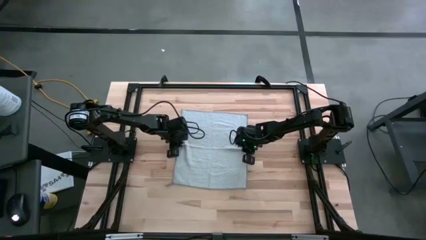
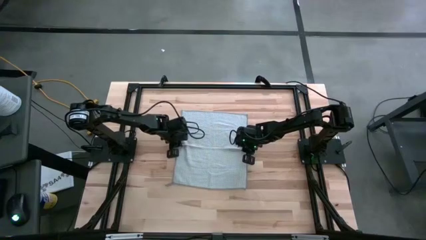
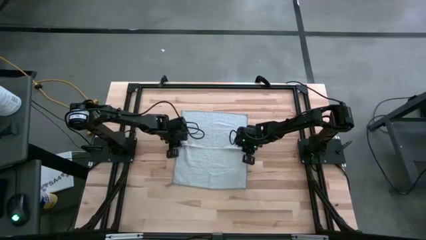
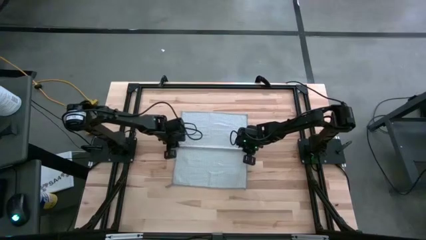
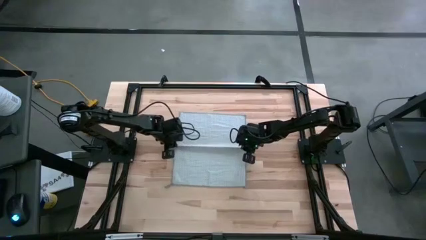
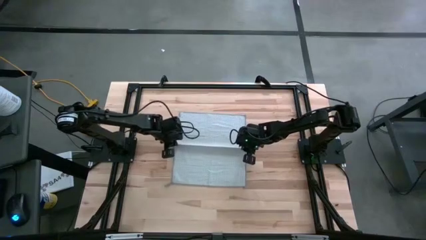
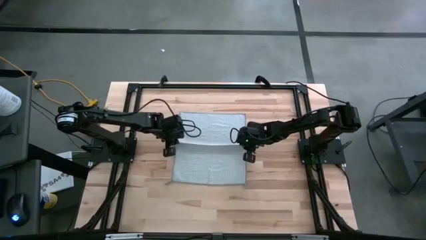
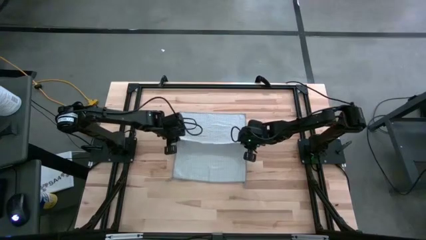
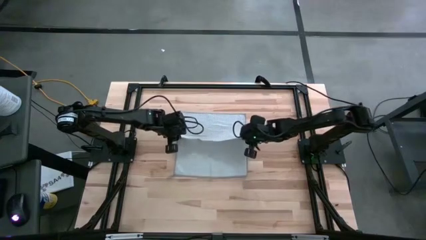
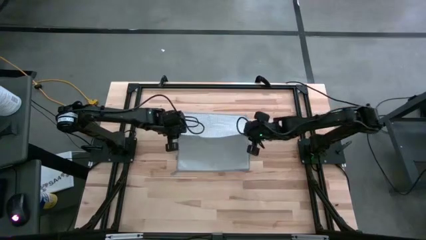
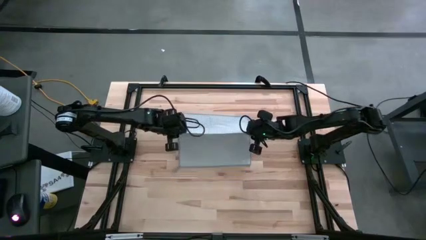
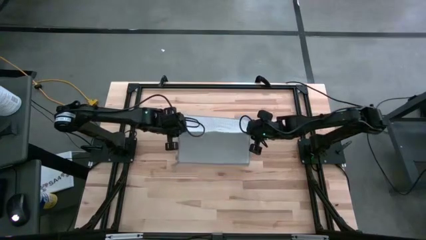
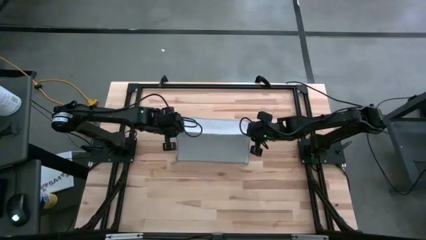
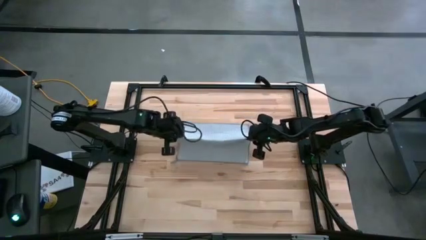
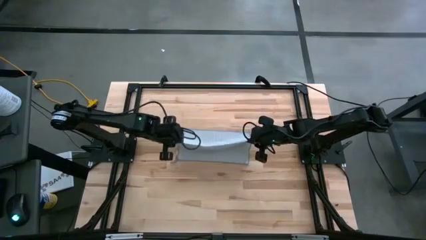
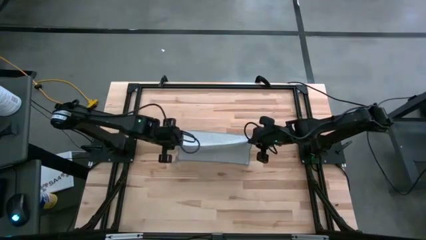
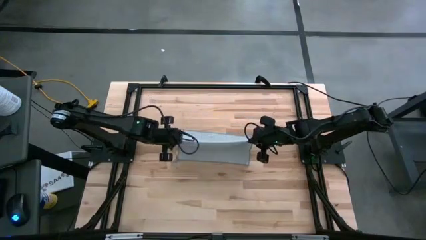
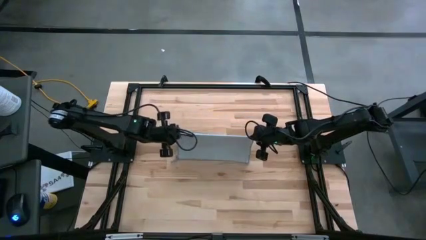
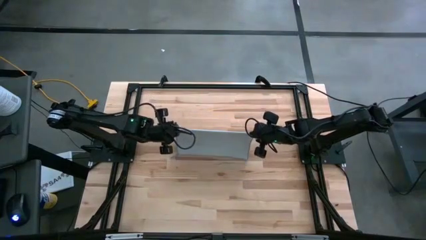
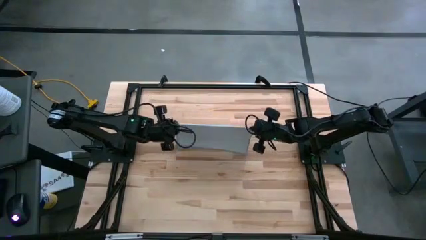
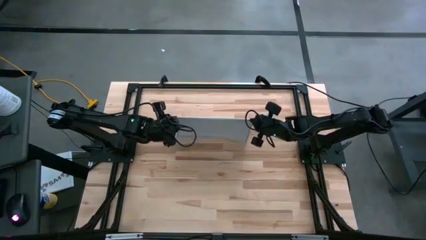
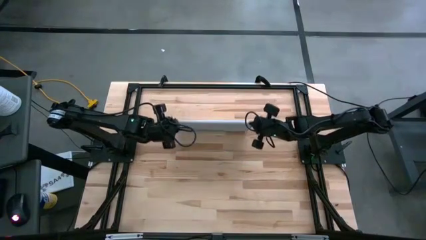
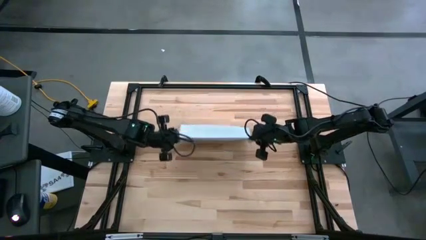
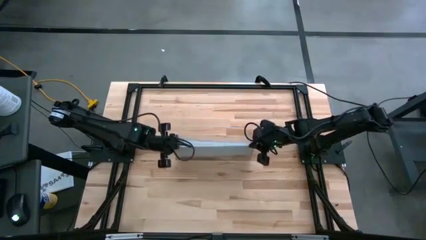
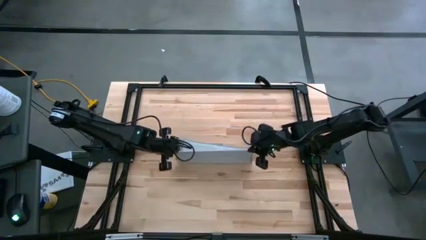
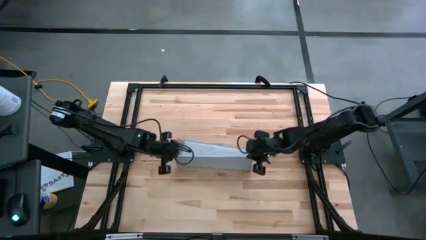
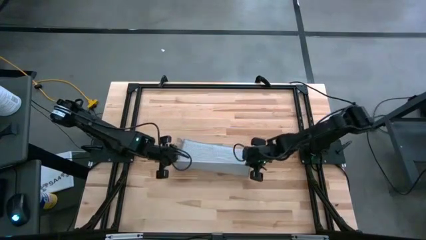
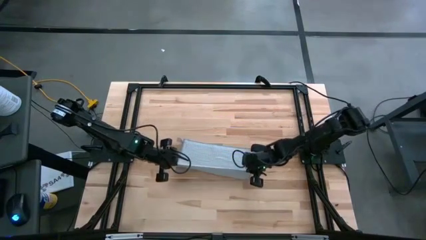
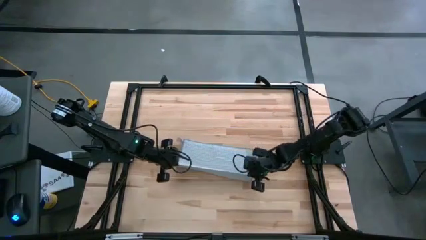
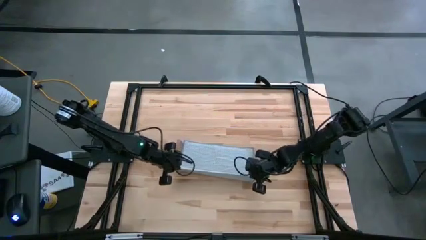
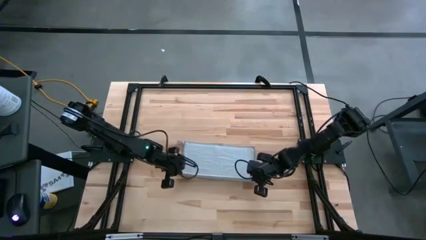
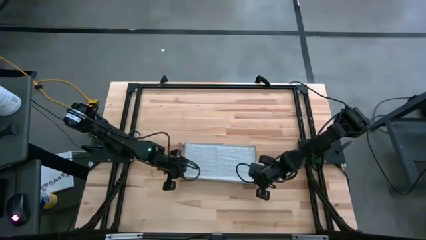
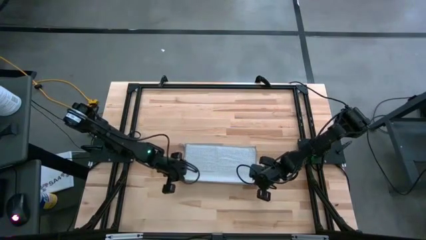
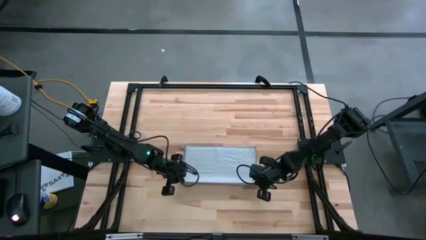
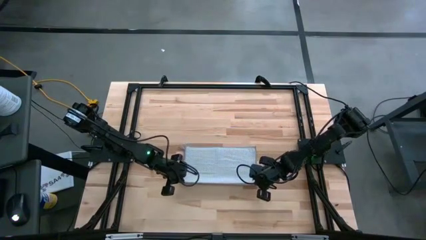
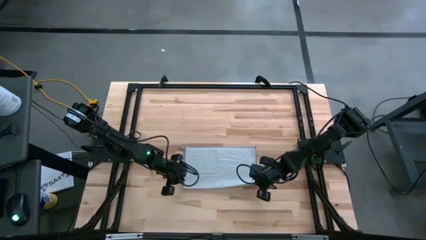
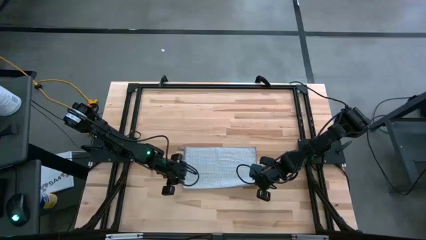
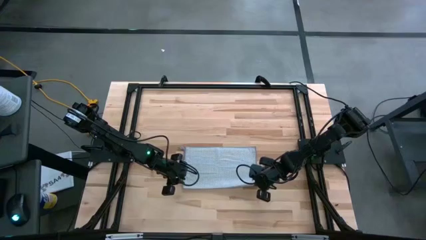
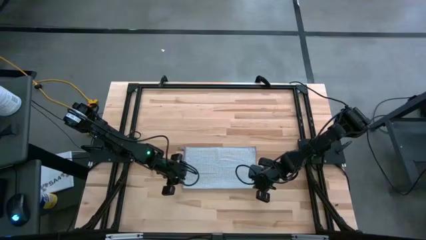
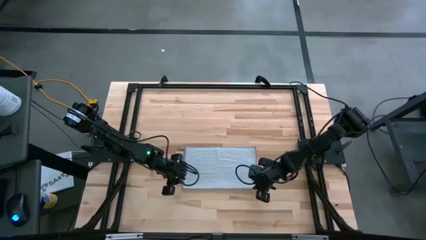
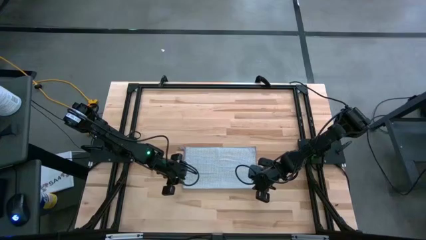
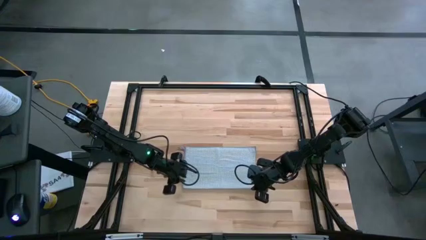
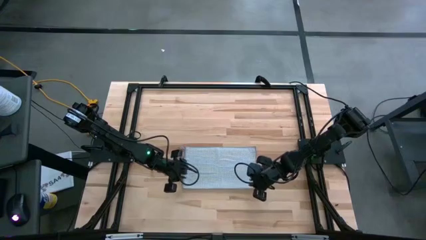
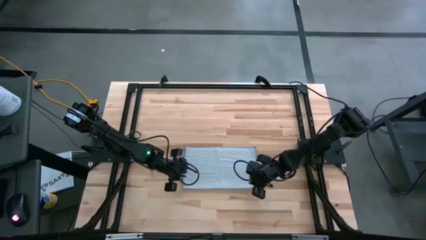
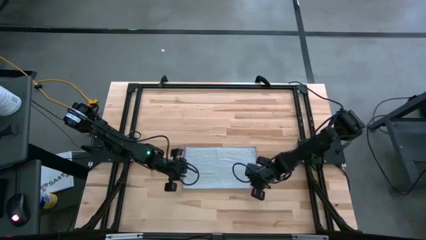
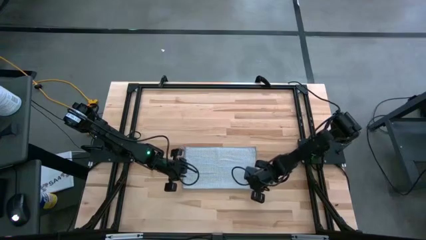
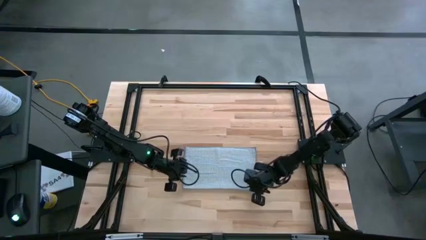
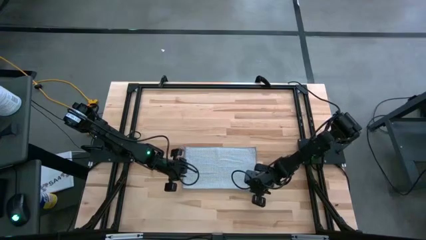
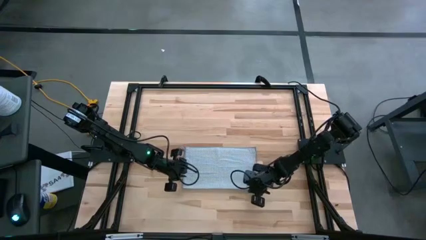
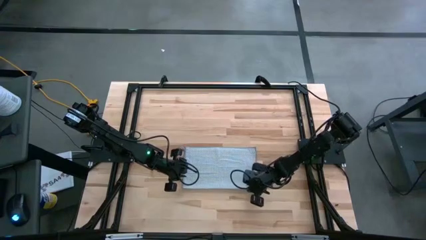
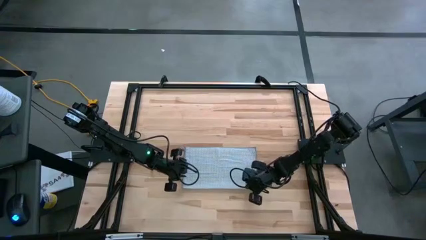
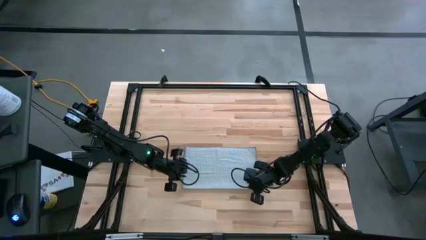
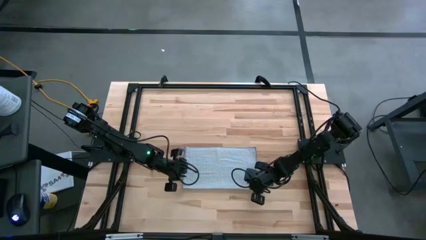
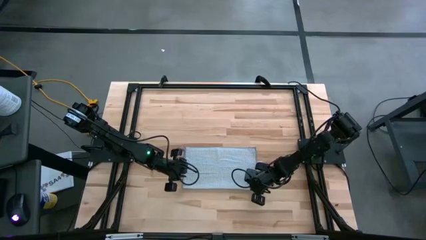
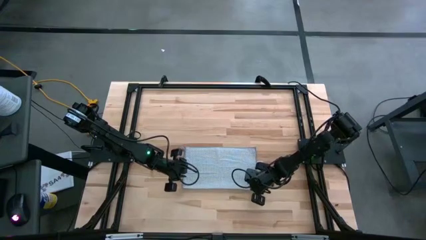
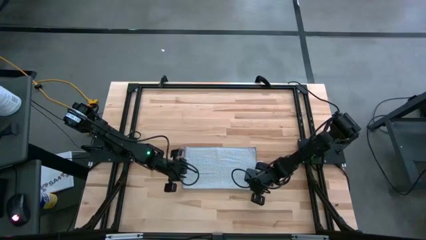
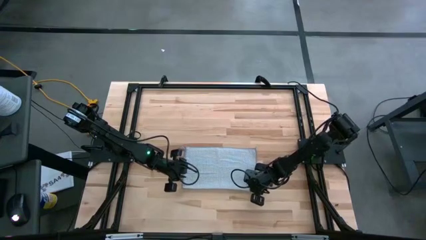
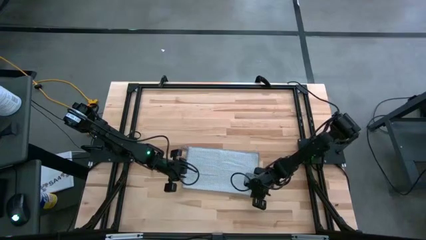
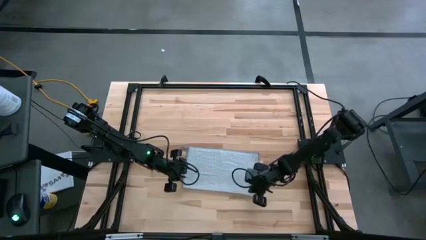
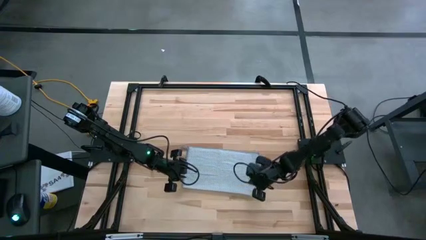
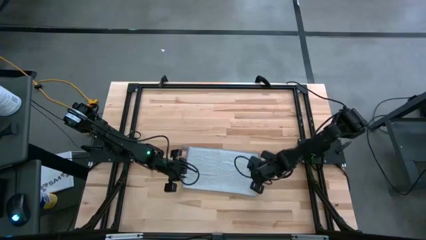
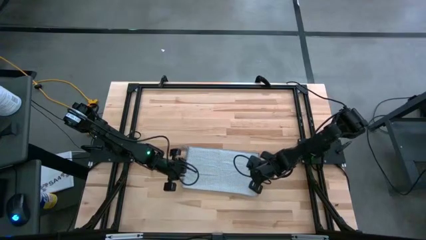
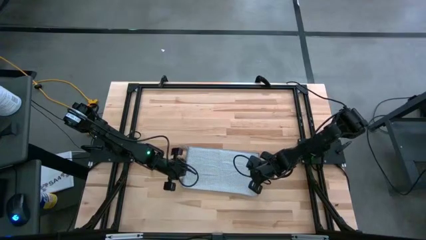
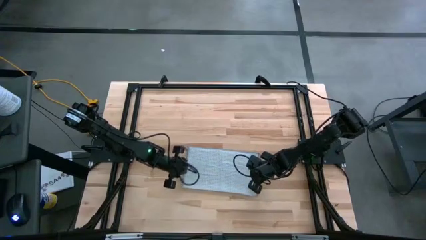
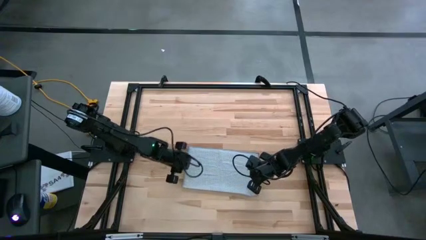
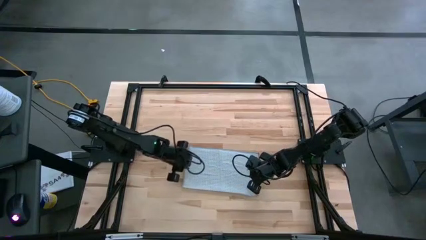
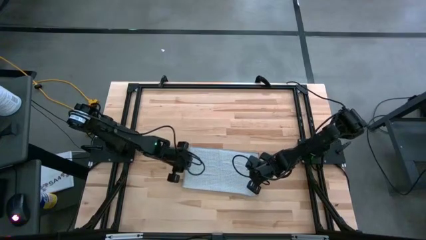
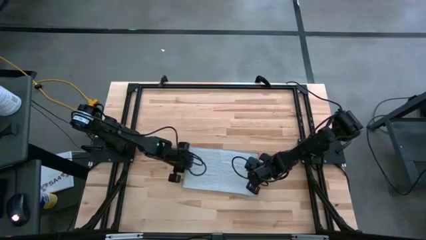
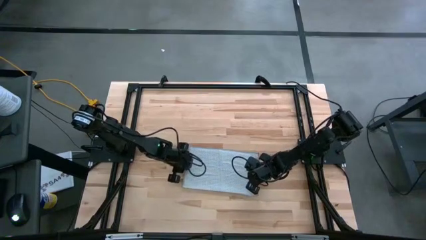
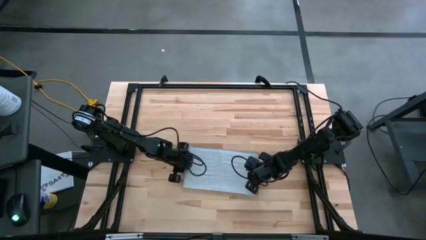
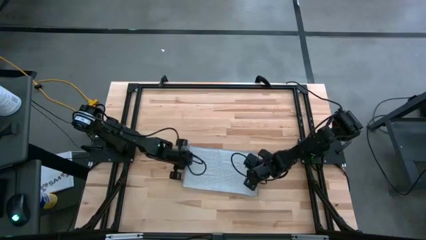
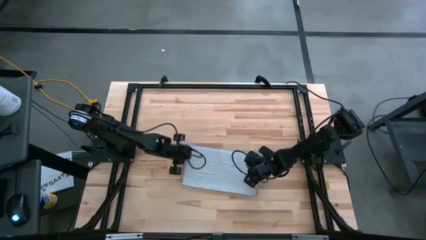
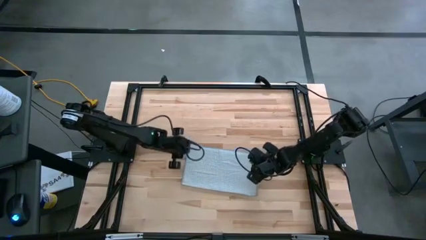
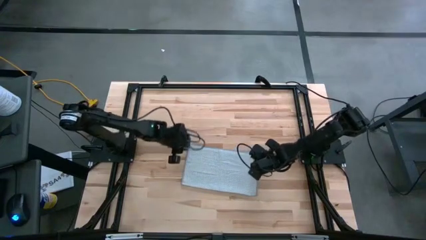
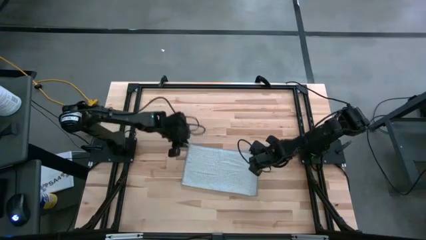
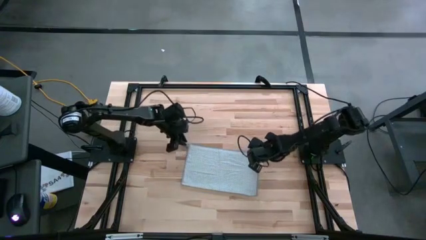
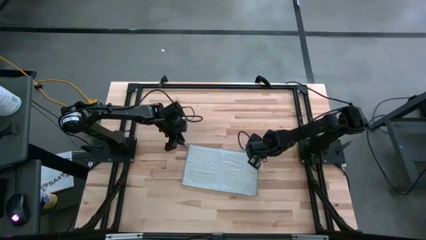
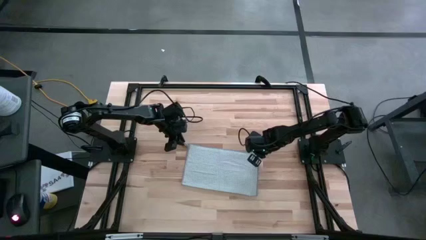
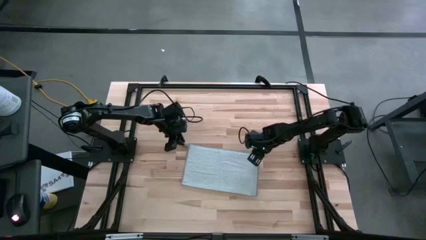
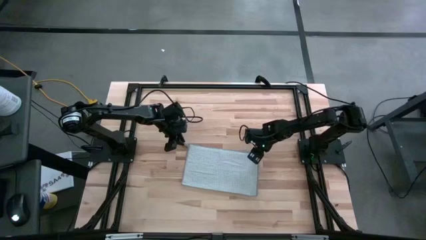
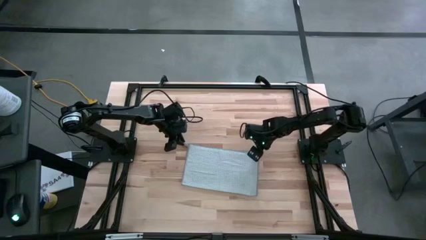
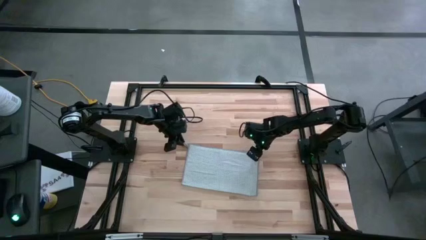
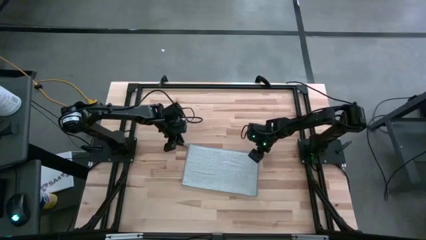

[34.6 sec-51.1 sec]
Task: Fold microfiber towels
Fold the gray towel
